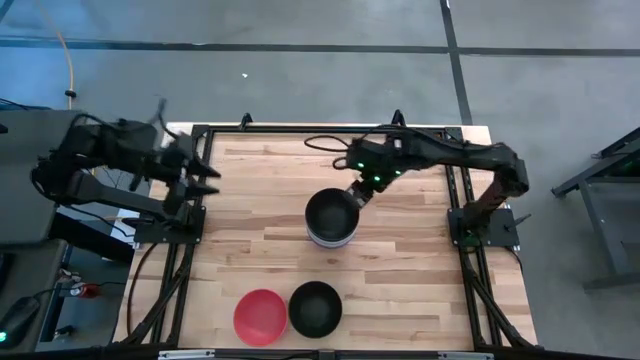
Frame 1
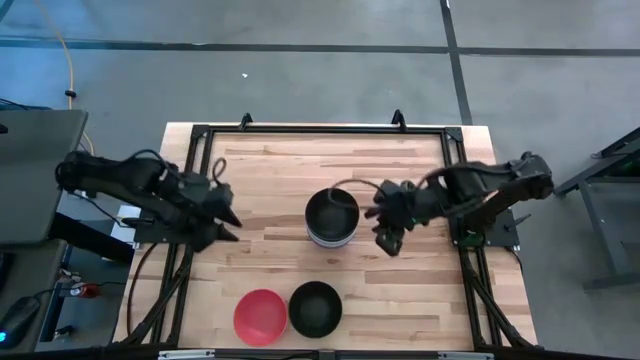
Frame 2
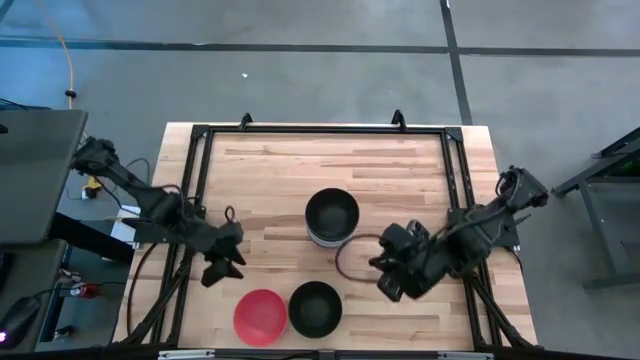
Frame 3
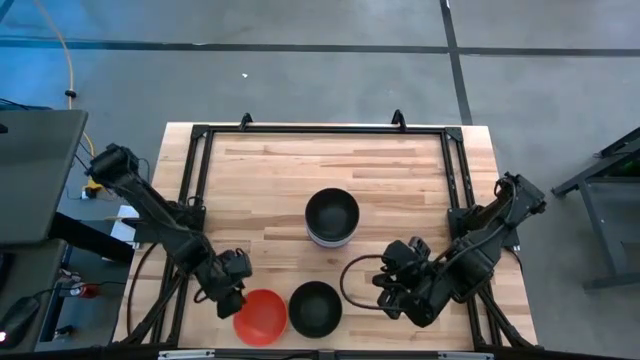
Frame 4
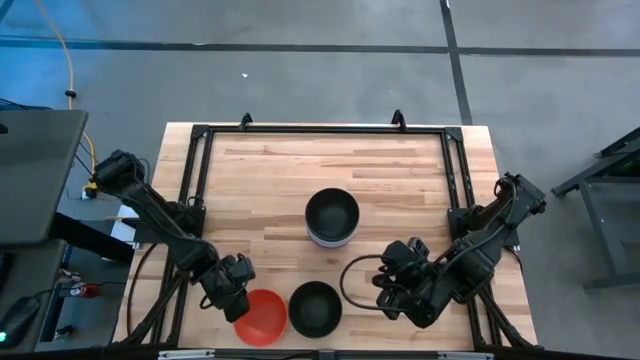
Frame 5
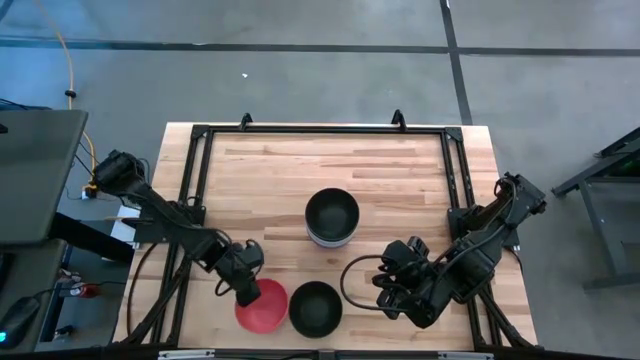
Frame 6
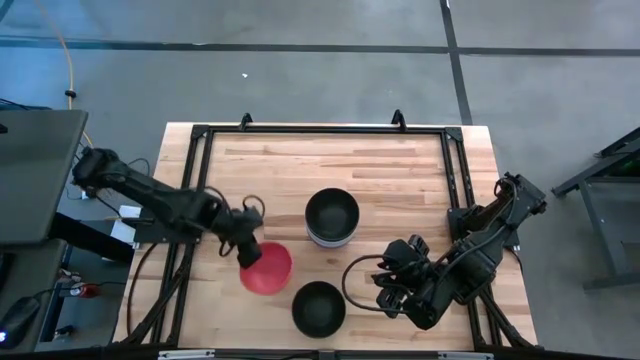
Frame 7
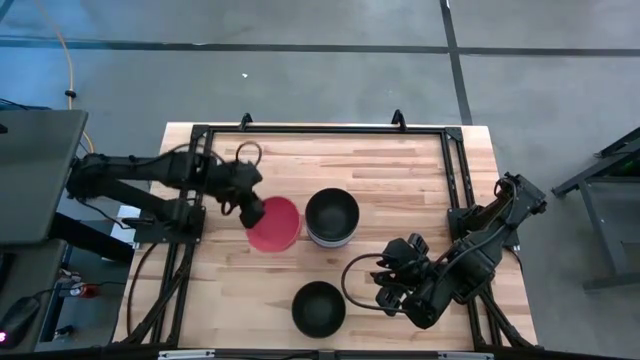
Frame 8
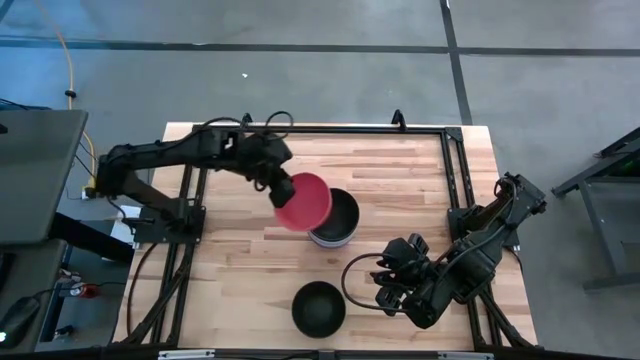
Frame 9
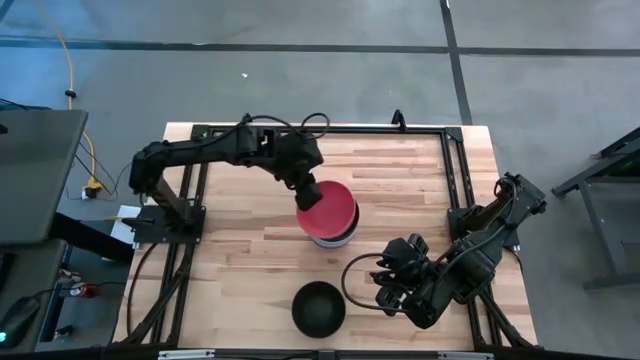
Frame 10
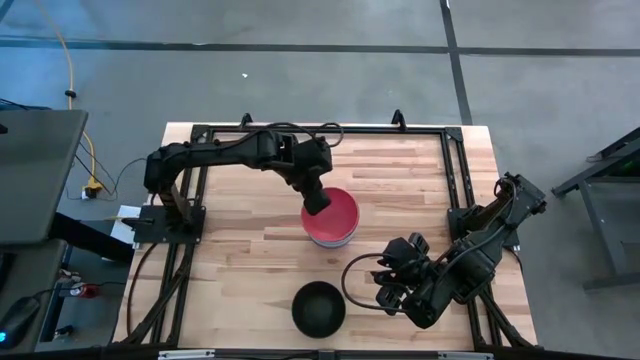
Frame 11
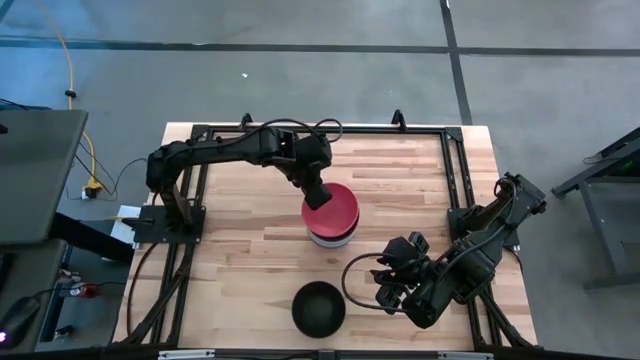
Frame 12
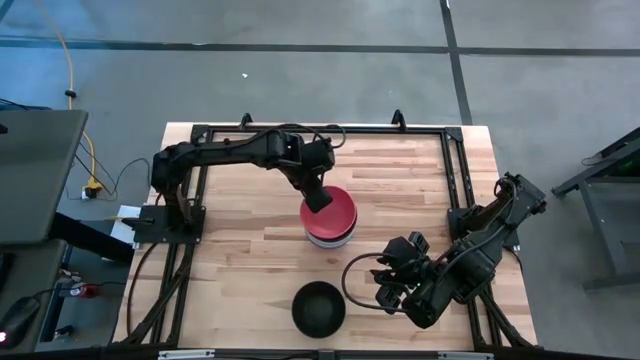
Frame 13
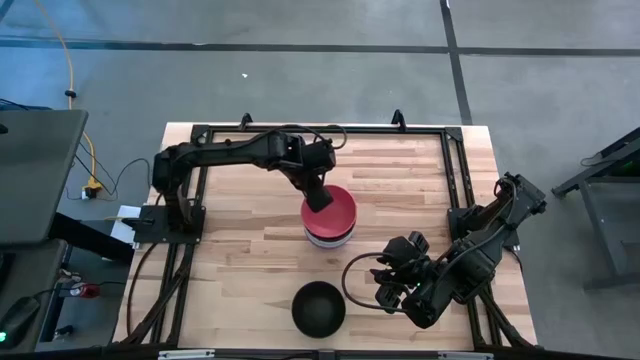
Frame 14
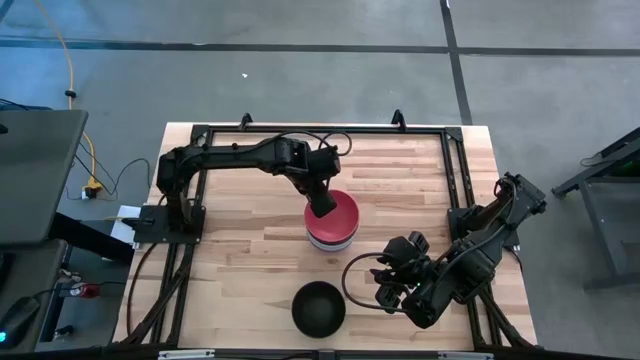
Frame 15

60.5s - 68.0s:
Task: Nest bowls inside each other
Stack the orange bowl on the black bowl

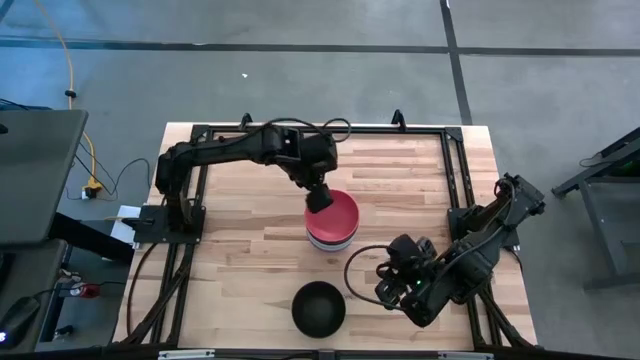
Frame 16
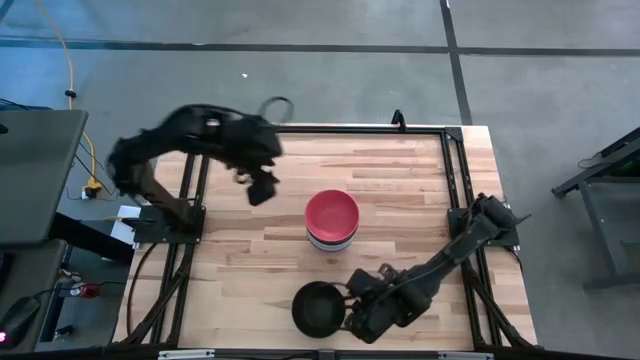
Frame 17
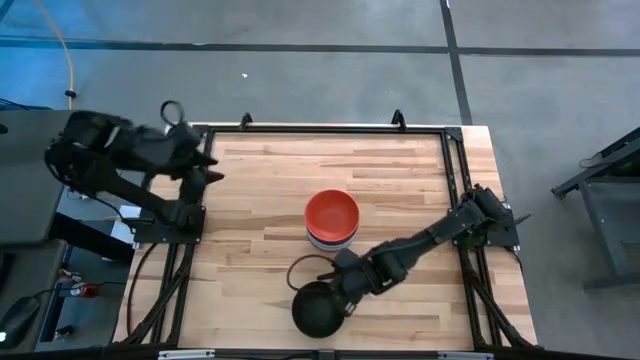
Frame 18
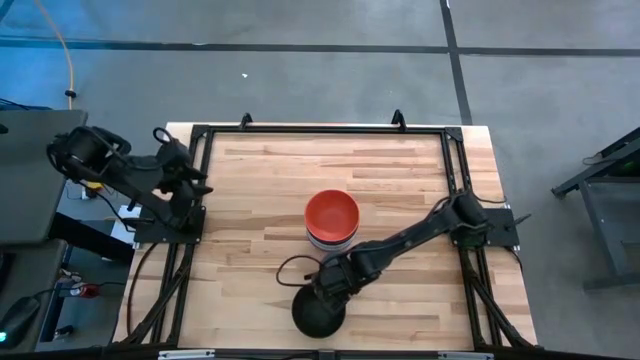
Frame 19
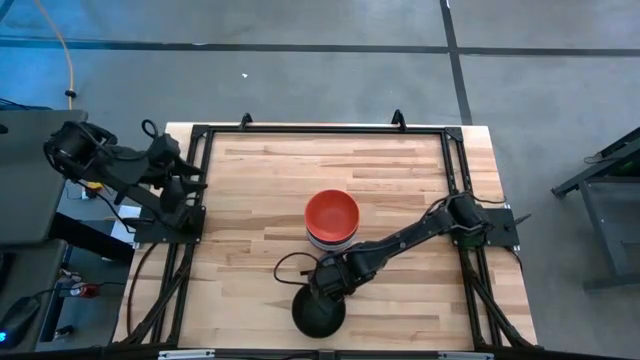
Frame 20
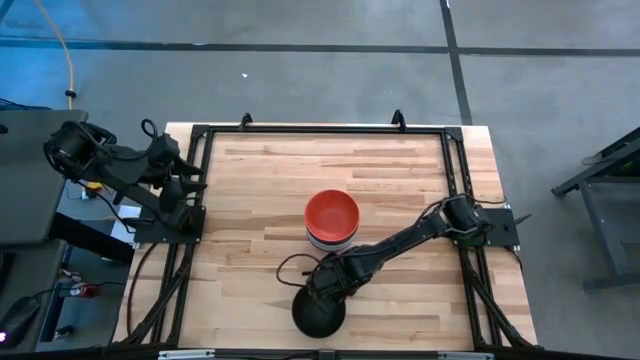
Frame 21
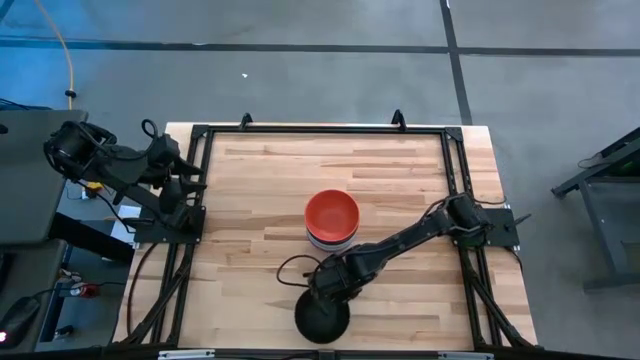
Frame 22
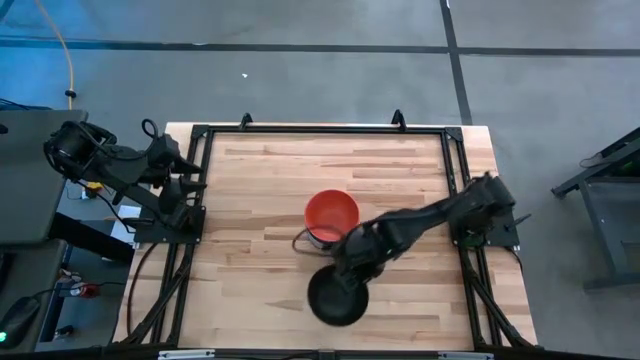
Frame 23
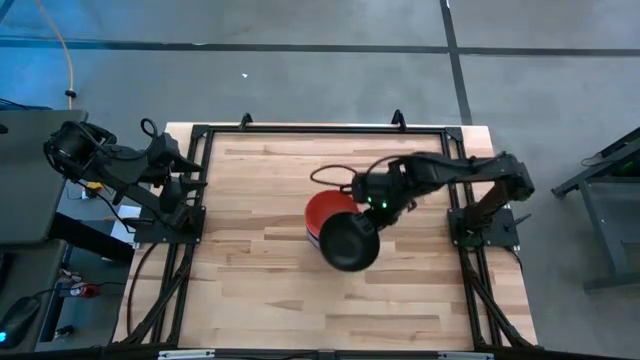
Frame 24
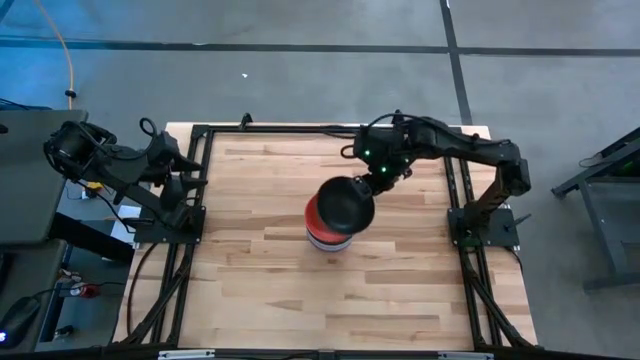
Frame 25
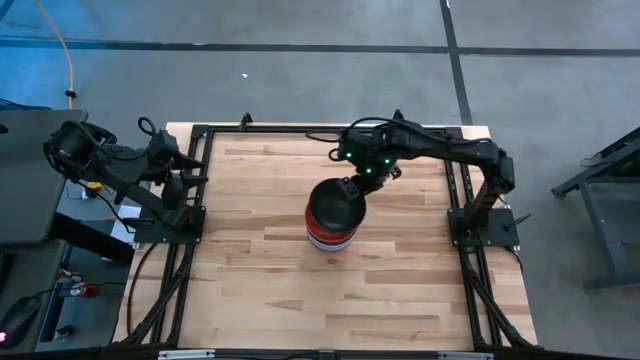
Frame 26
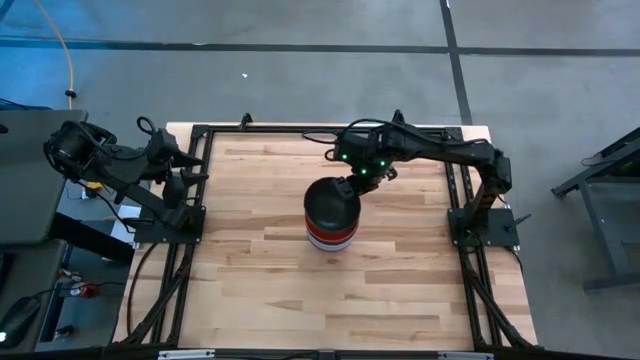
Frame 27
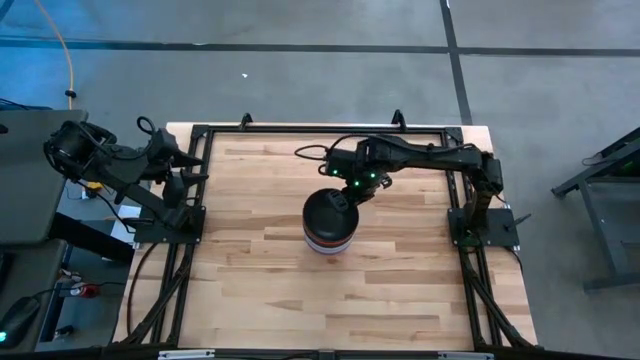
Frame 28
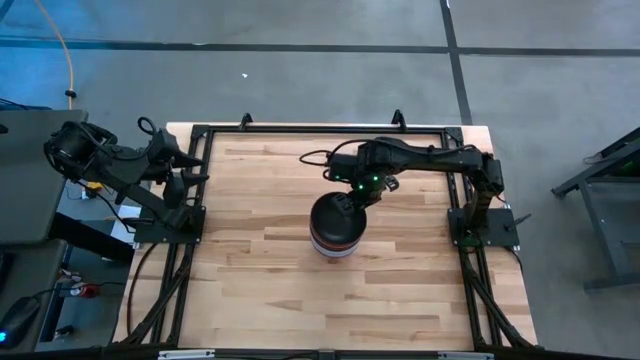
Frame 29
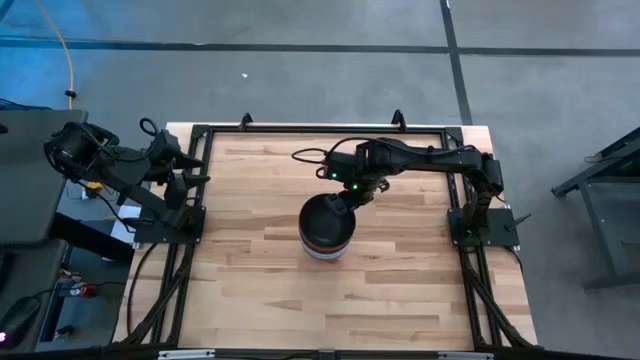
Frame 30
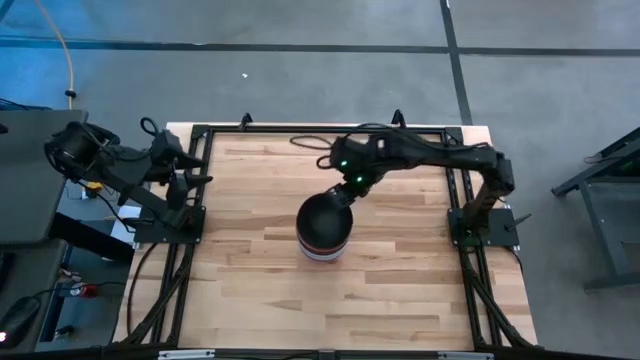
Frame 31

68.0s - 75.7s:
Stack the black bowl on the orange bowl

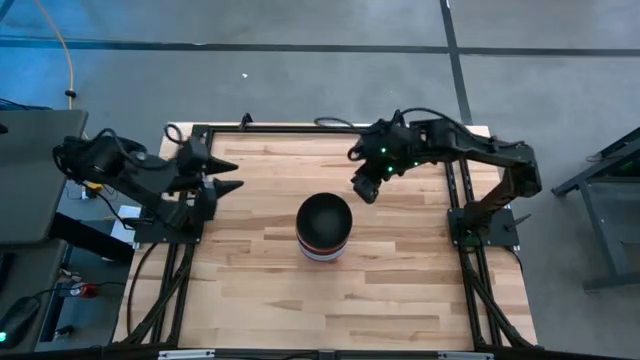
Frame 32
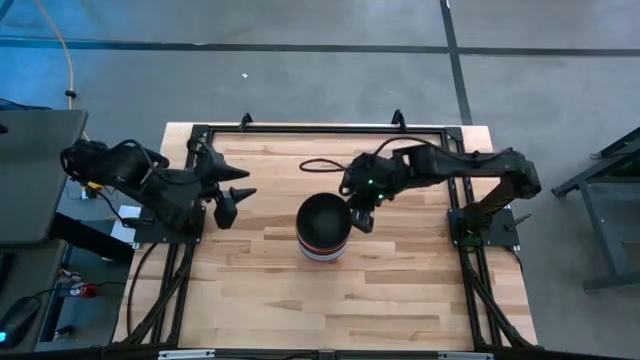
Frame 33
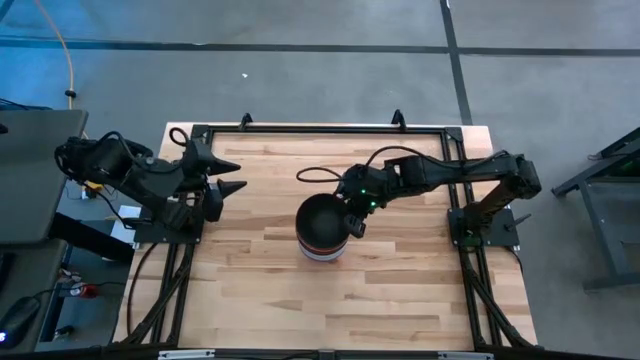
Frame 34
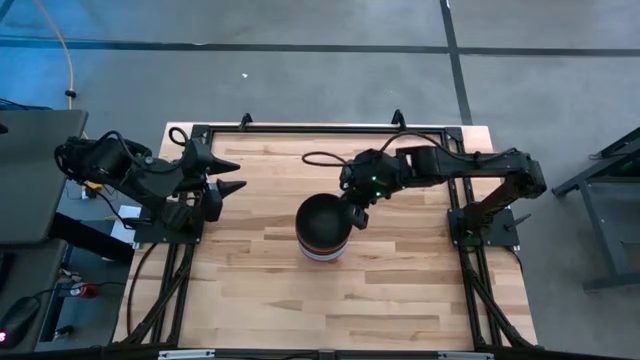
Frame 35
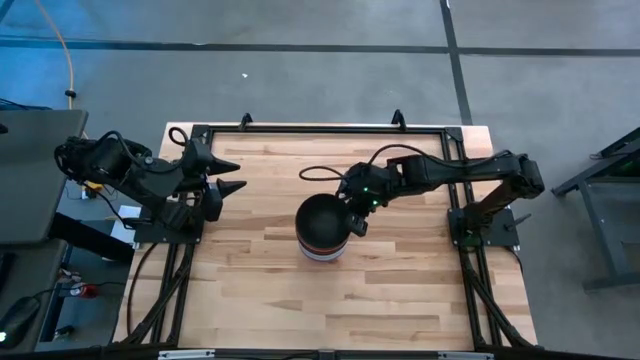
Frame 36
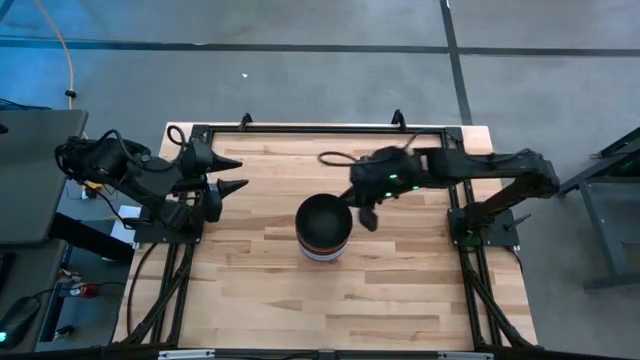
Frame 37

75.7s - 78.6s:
Adjust the black bowl

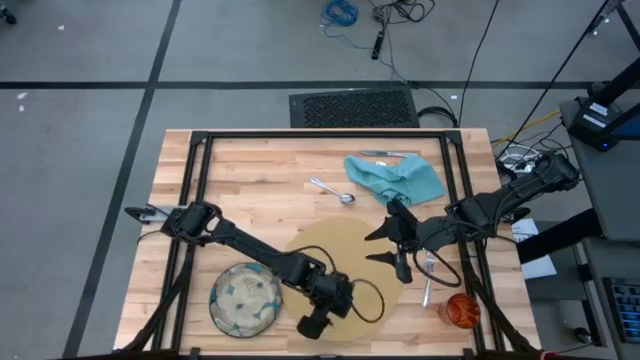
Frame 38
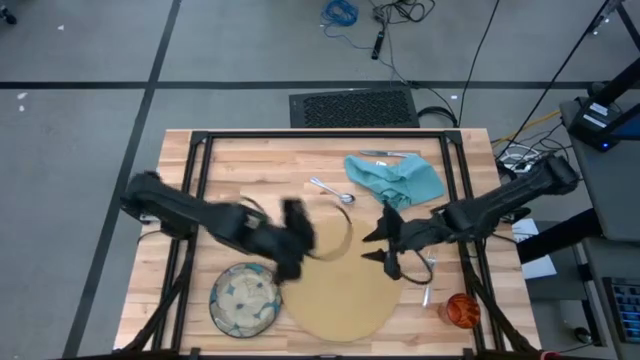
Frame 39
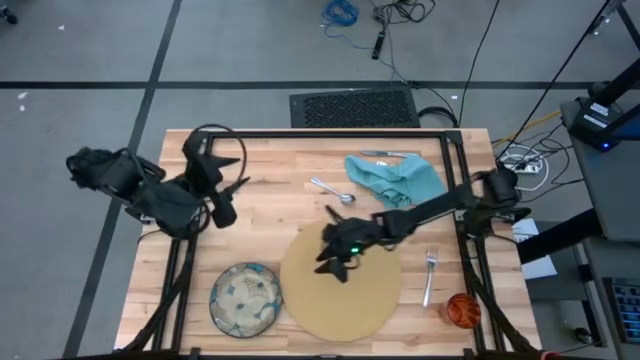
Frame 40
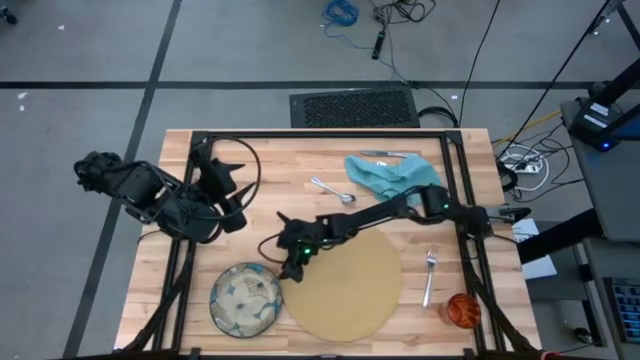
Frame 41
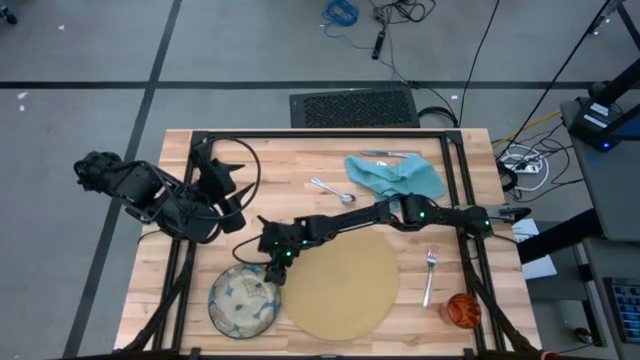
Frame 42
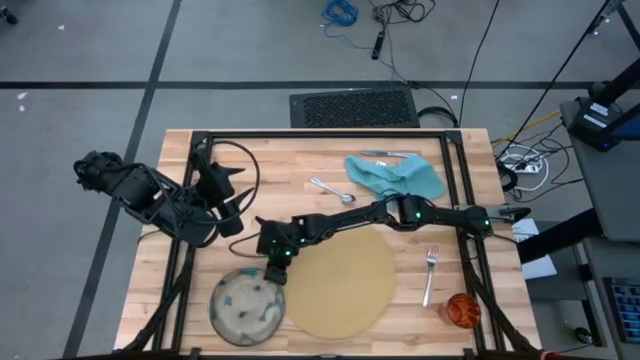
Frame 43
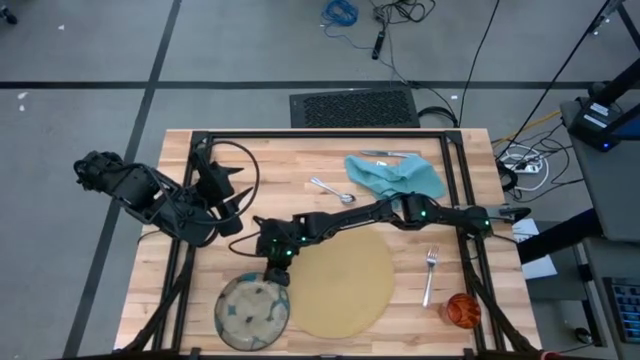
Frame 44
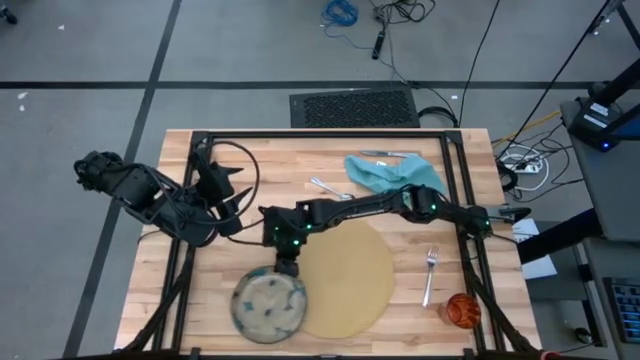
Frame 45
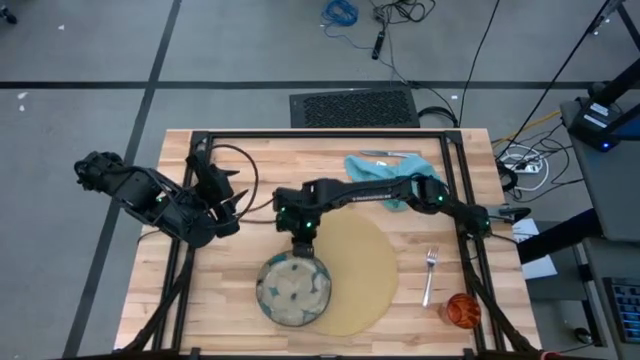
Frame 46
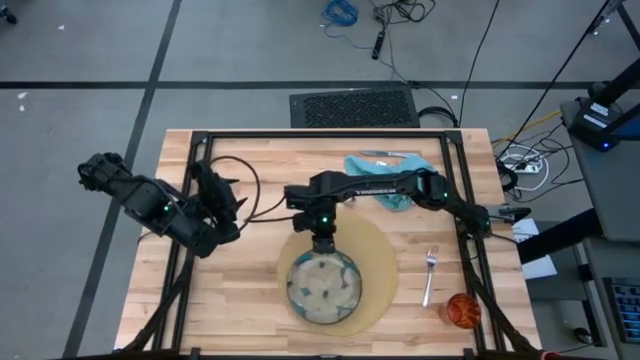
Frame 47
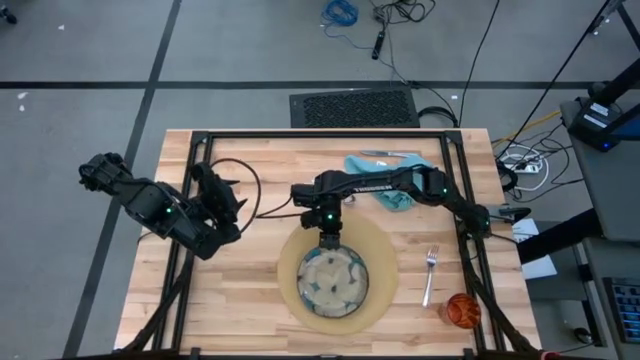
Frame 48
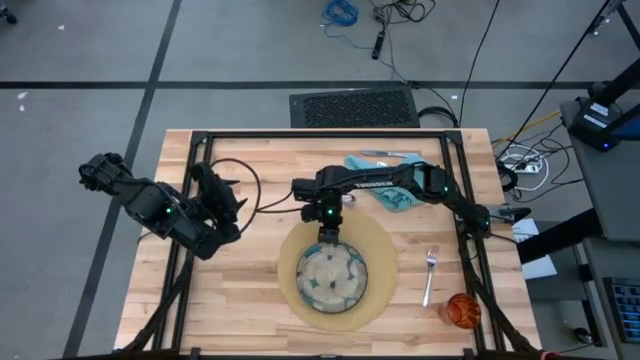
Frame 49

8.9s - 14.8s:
Task: Set table place
Put the blue floral-patterned plate on the brown mat
